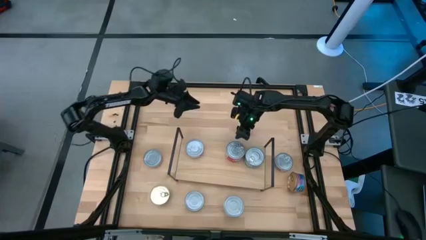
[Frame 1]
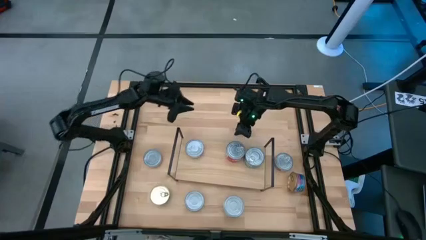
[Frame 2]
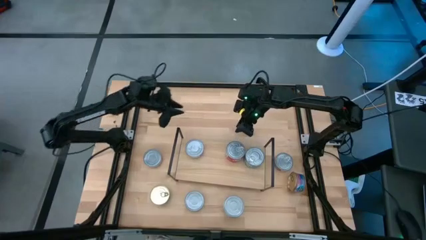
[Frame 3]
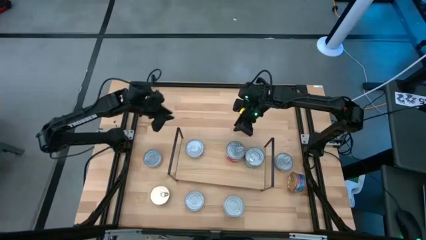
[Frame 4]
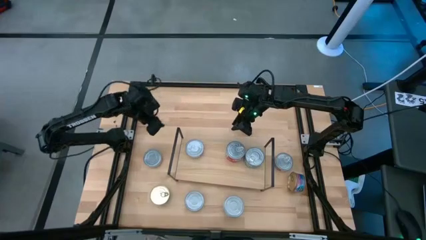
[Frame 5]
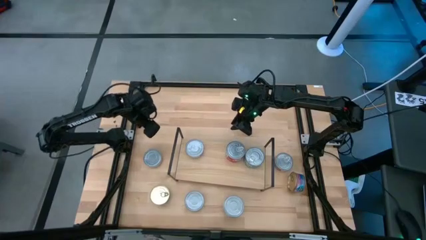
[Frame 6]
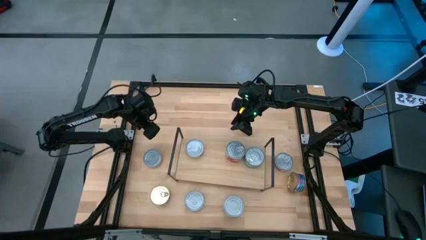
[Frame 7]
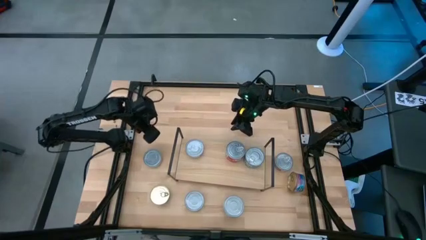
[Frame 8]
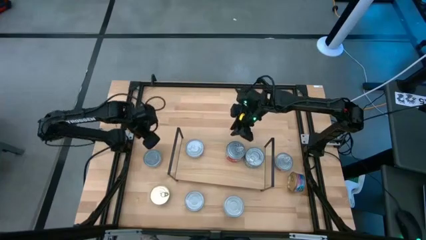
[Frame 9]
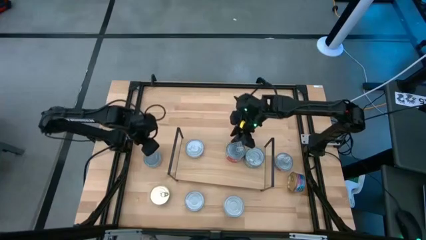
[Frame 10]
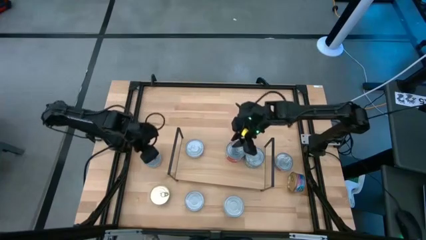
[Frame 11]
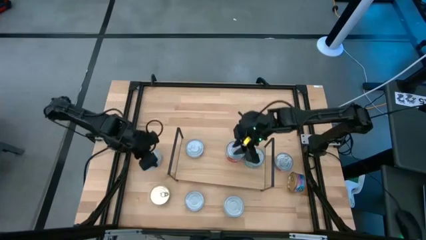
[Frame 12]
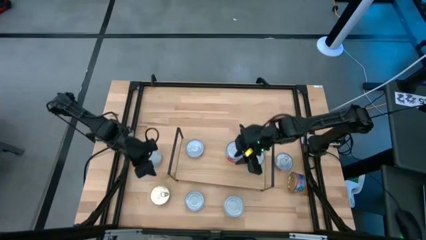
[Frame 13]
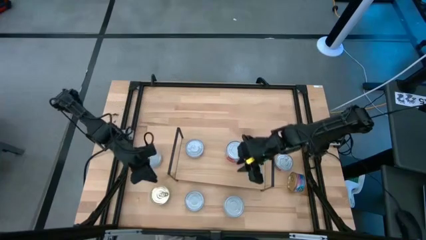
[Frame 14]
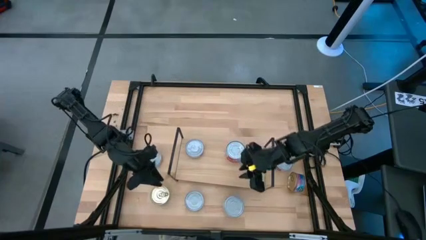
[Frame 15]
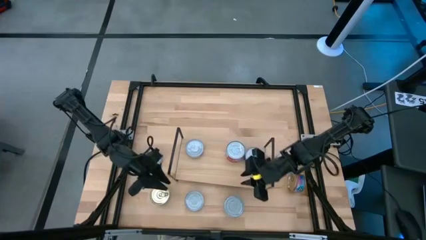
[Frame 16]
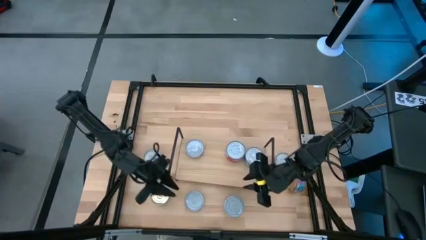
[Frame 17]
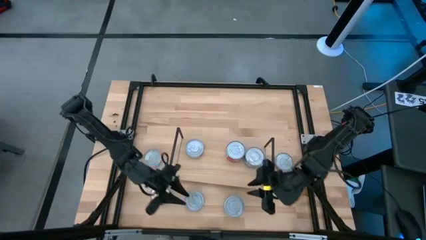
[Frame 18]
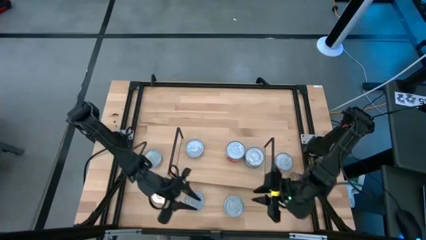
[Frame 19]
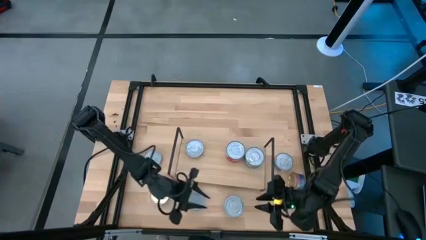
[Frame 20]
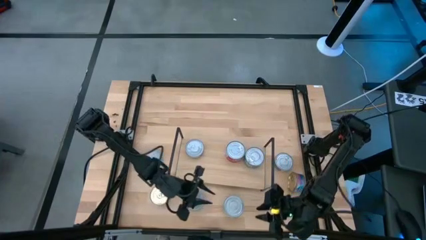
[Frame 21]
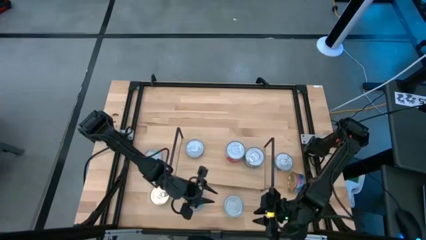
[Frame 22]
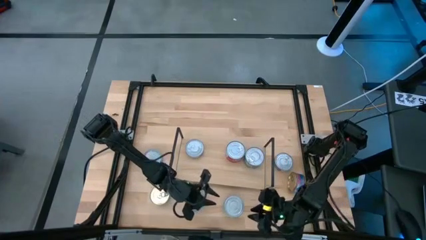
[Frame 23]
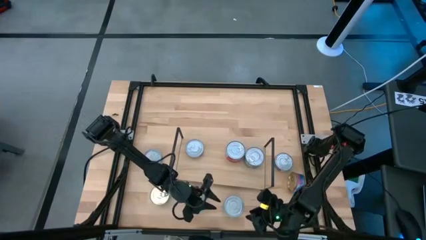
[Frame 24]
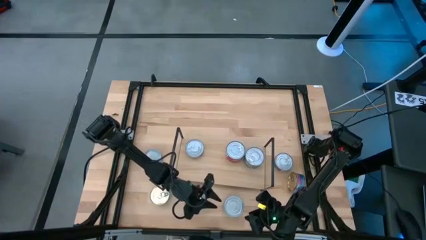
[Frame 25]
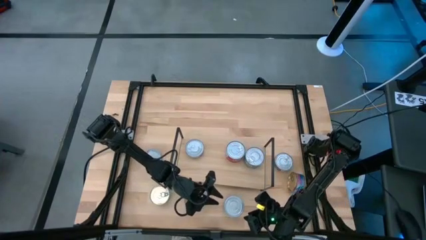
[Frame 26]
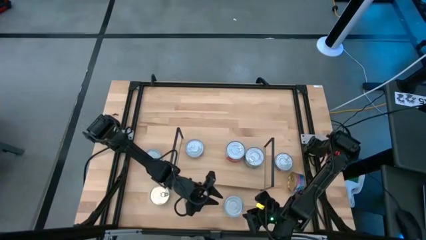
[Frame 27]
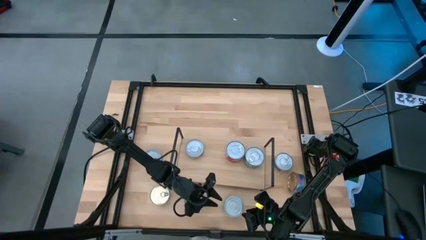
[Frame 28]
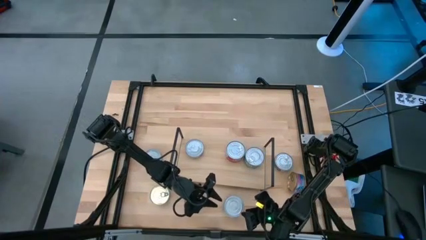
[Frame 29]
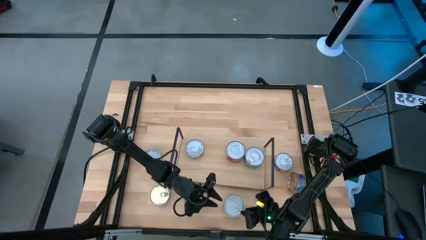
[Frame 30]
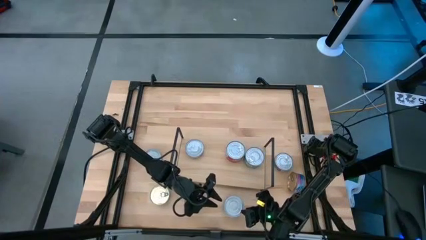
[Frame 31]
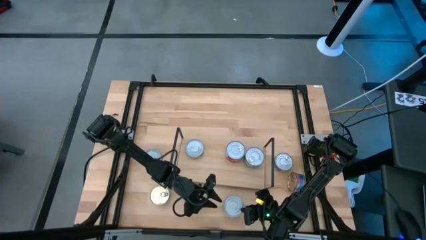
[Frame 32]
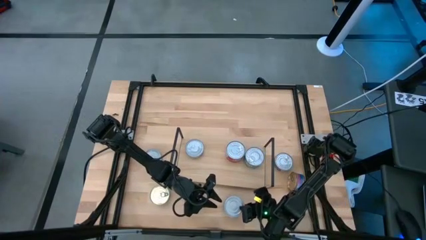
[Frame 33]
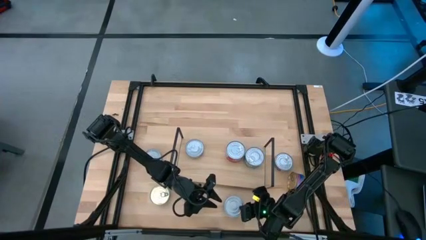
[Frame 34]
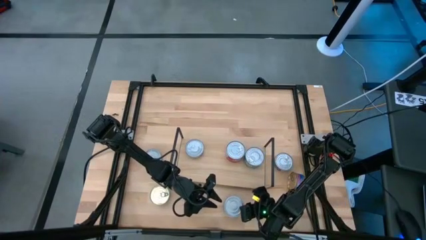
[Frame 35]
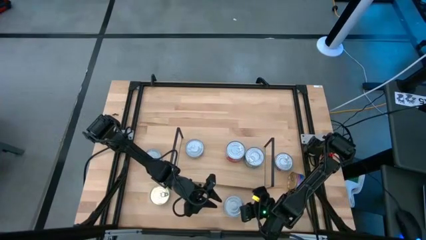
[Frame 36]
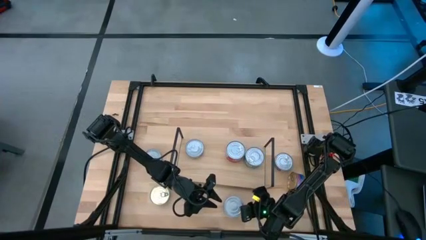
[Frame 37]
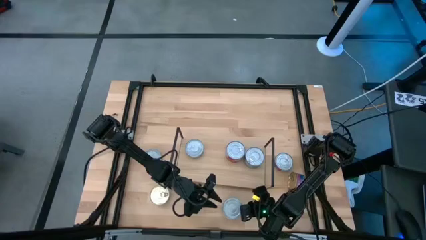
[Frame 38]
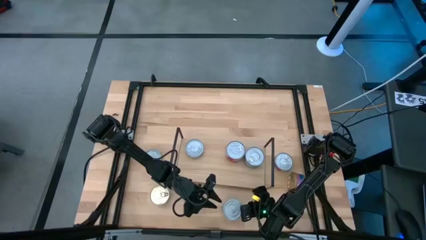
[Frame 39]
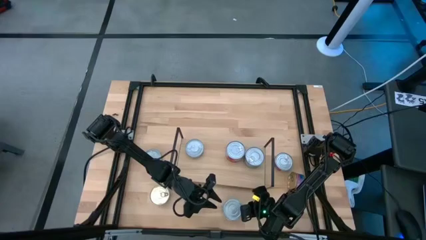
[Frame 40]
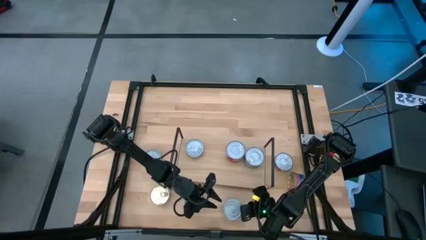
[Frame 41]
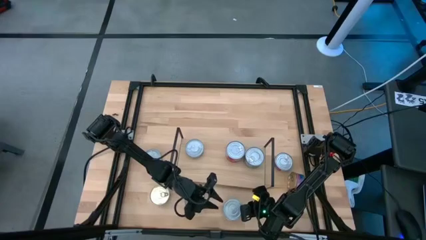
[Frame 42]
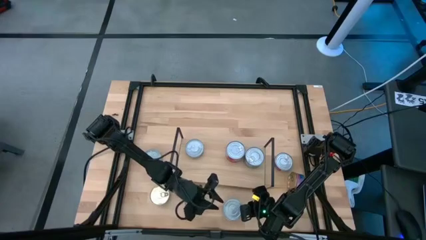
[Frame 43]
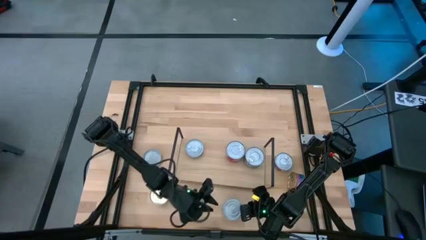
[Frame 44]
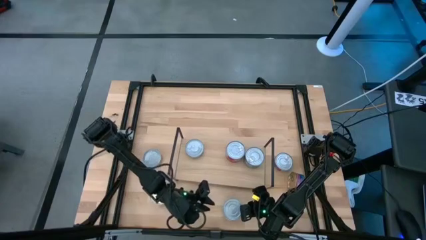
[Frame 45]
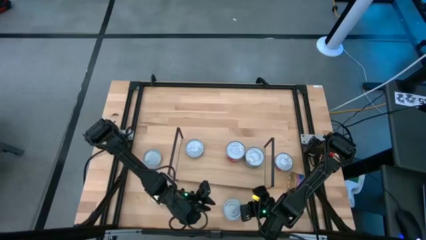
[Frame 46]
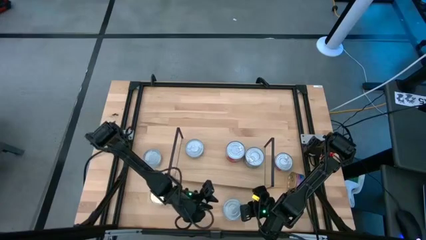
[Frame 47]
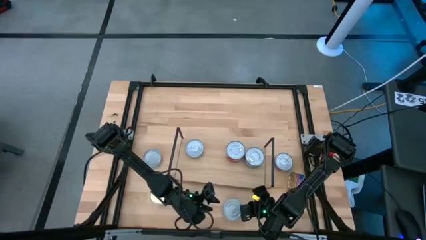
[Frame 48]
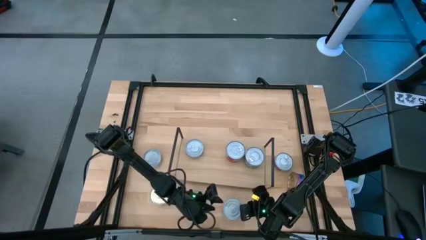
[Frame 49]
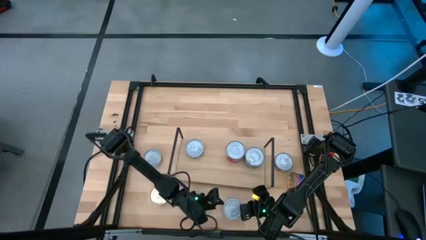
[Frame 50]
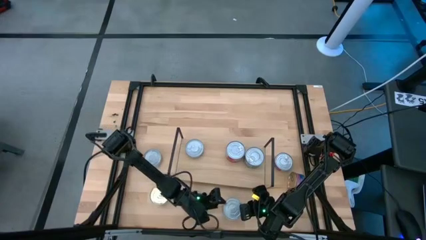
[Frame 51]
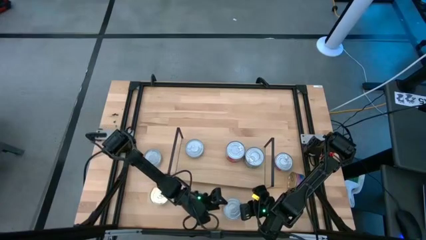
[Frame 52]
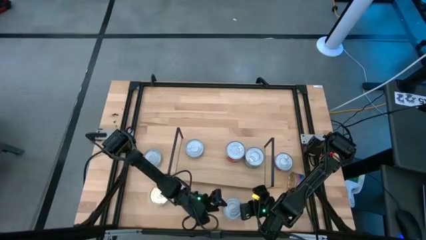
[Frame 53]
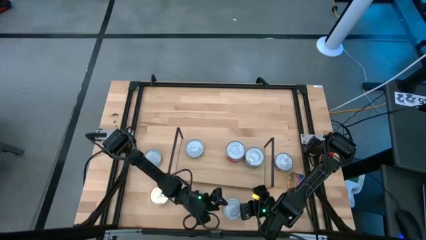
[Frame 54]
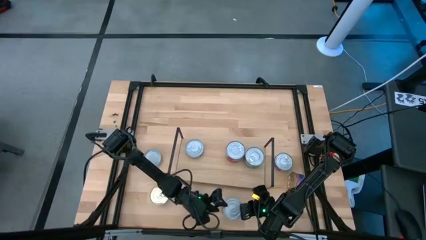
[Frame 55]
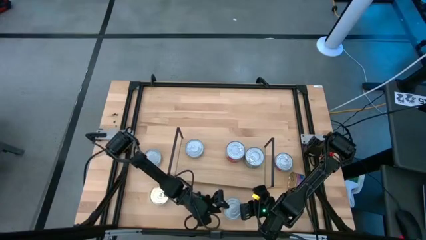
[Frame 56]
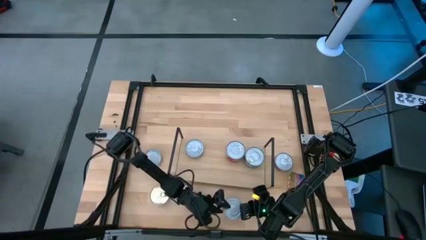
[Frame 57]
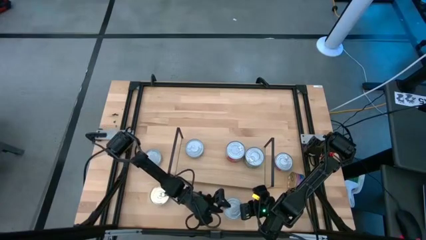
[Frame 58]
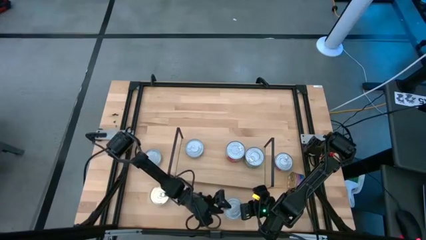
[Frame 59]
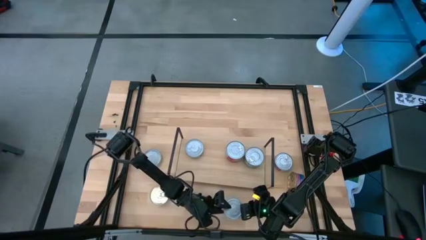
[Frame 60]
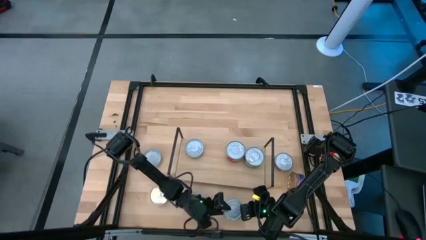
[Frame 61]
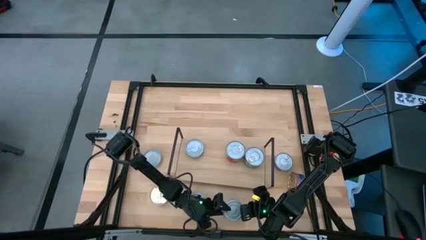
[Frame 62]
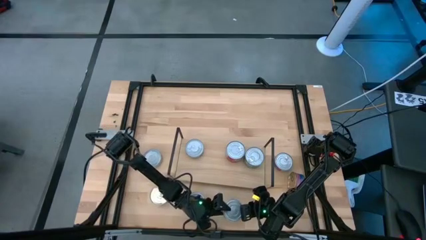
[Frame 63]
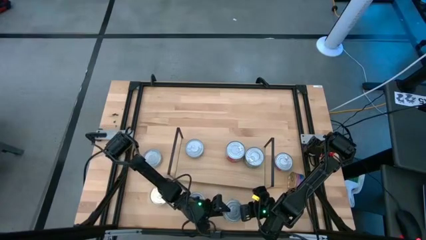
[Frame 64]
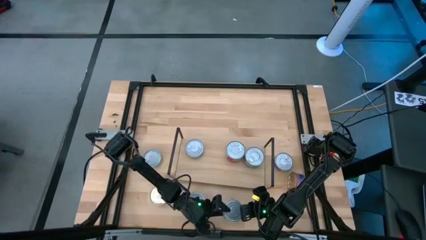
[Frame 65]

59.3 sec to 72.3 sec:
Task: Stack canned seafood by type on shelf
Stack the green white tuna on top of the green white tuna can on the shelf

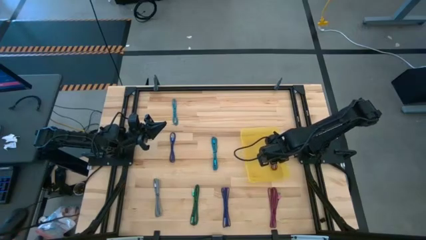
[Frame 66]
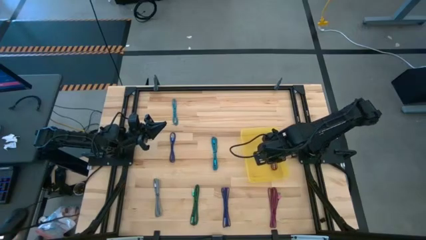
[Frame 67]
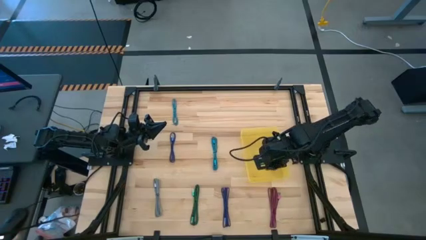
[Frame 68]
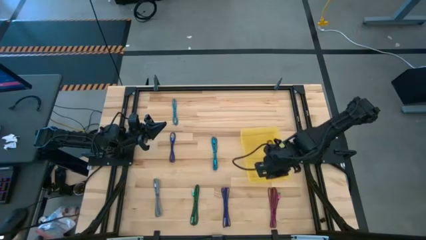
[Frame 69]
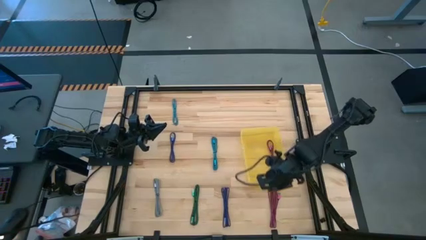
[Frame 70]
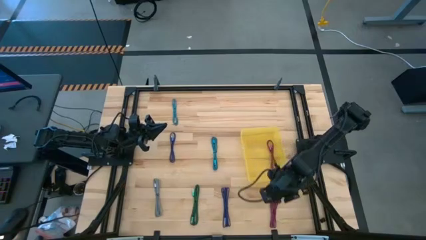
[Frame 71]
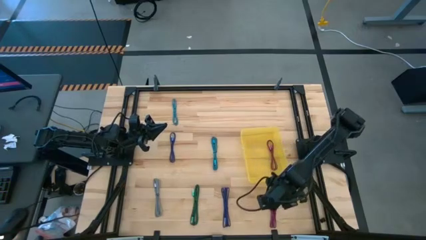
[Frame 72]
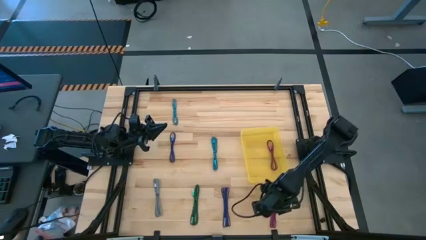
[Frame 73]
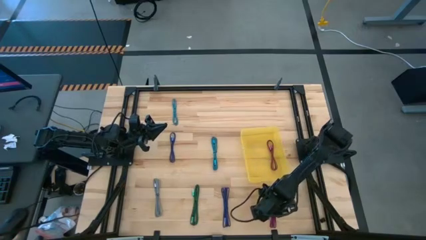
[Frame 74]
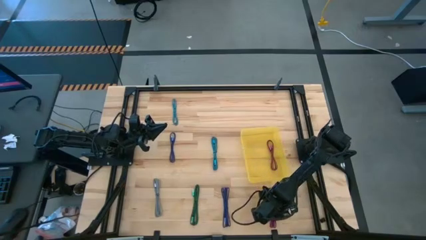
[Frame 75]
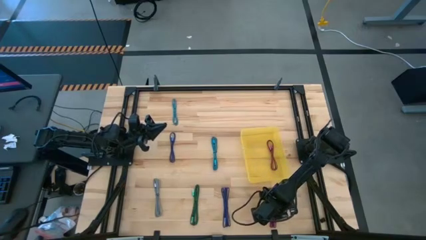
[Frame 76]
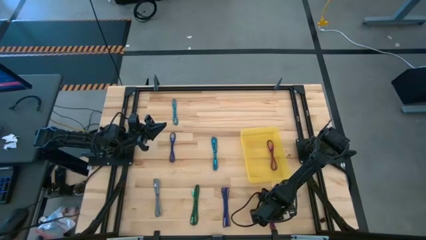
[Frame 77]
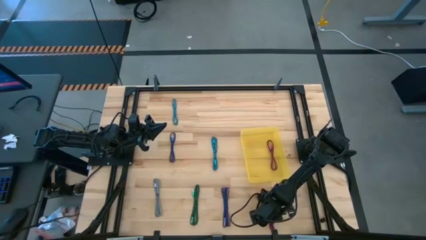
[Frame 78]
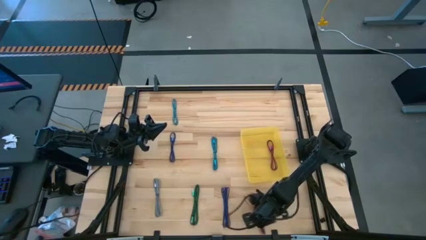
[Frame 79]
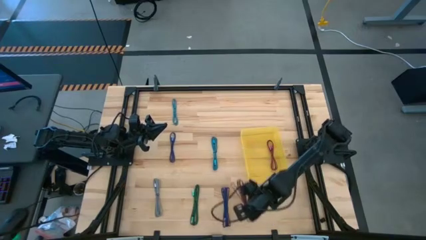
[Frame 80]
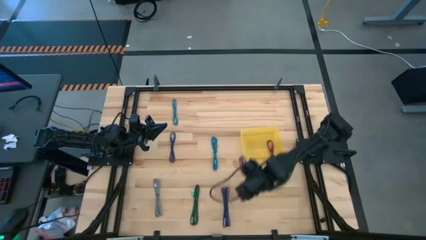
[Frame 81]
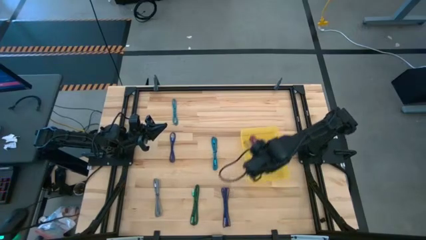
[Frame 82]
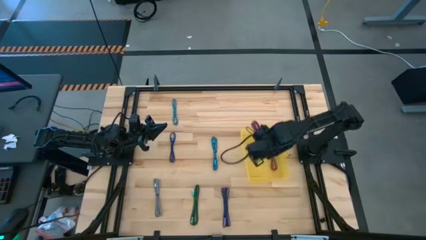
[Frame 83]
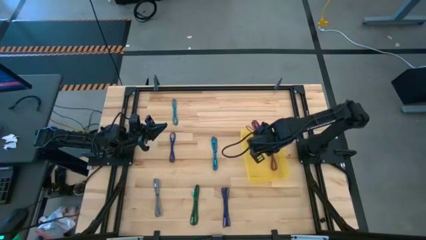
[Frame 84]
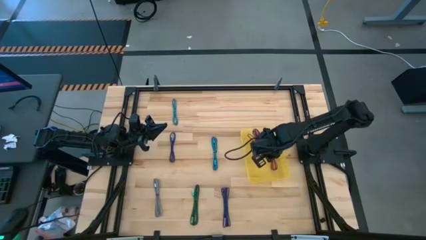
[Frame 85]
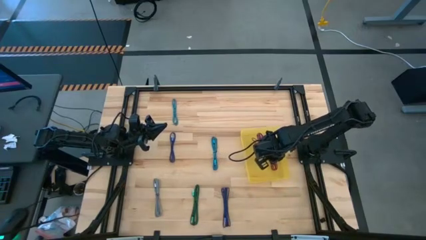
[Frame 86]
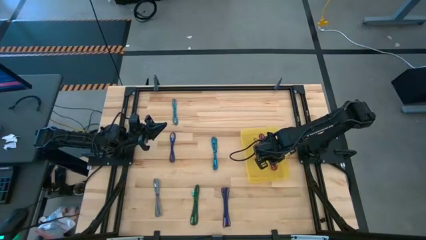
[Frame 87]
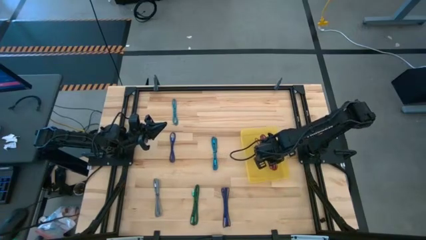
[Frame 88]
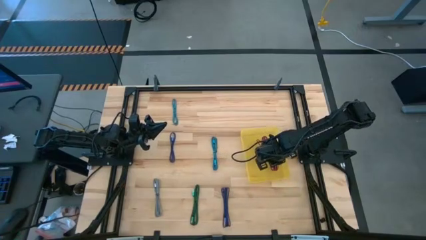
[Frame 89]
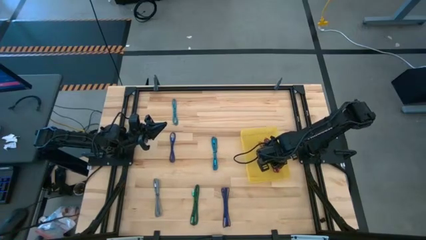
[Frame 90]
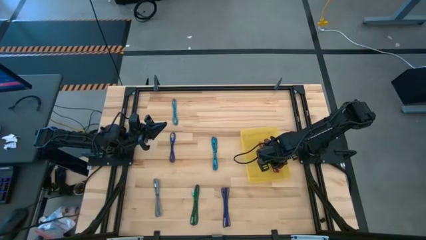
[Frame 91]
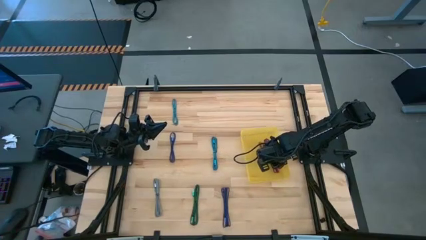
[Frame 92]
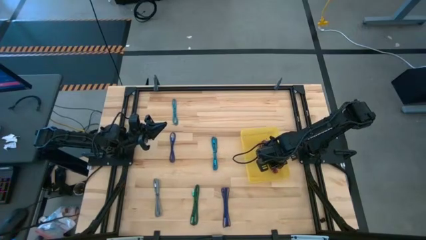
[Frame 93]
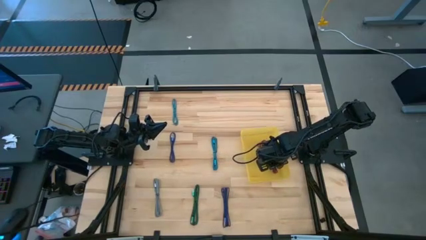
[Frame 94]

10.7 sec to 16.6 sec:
Task: Pick and place USB-C Cables
Put the red charger cable into the yellow bin
